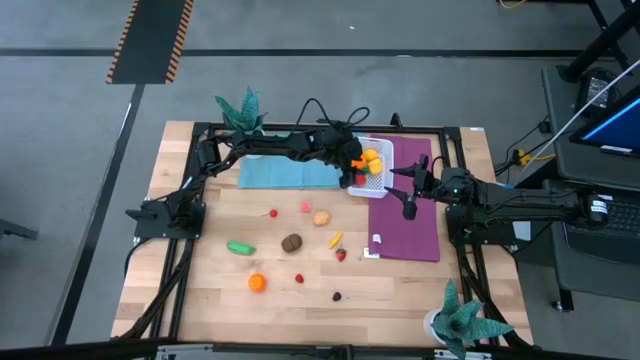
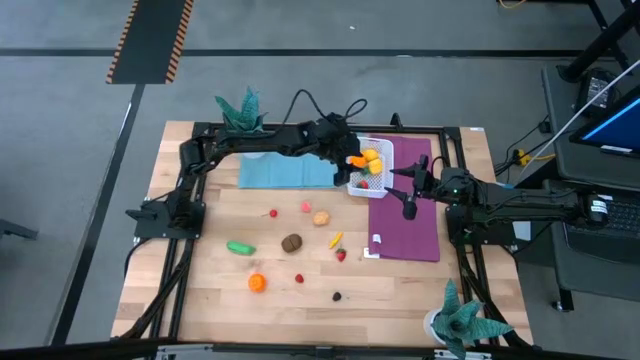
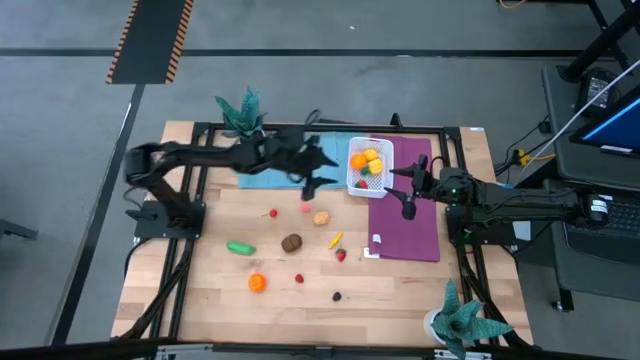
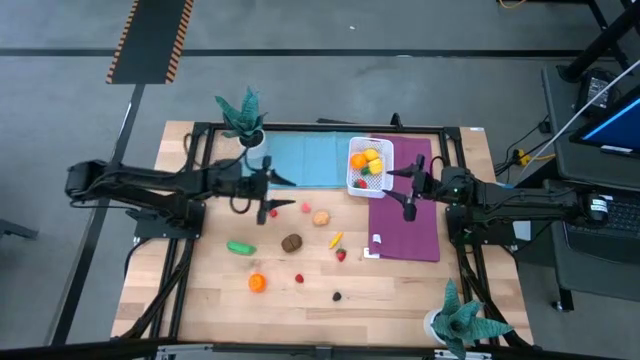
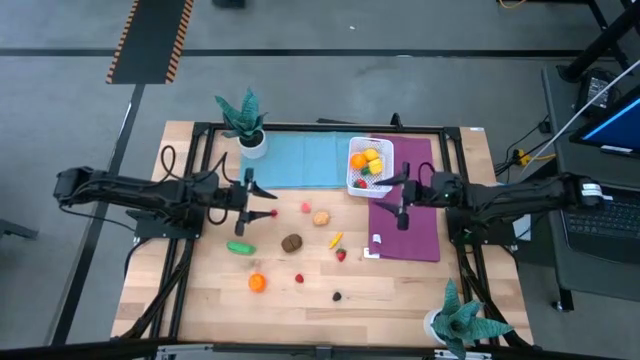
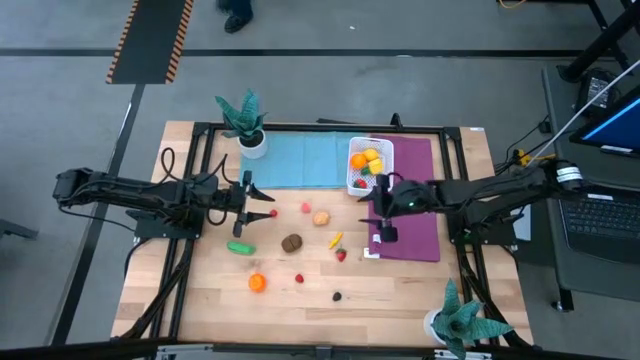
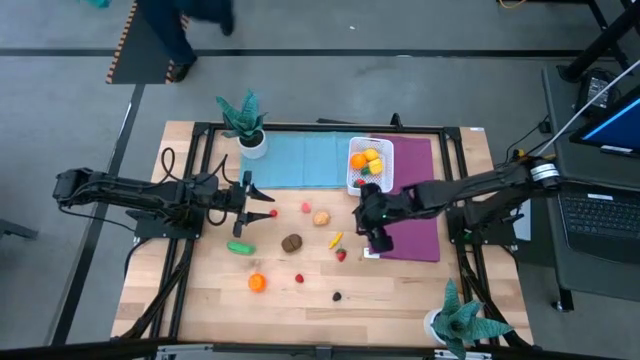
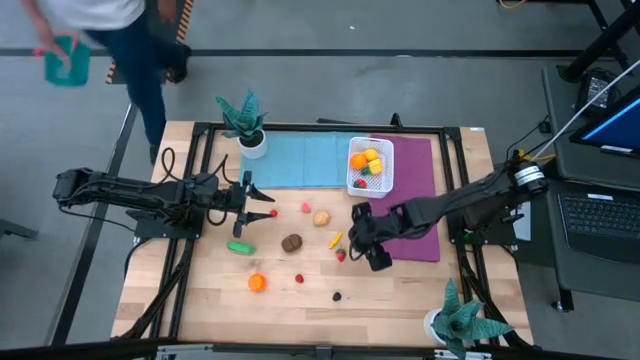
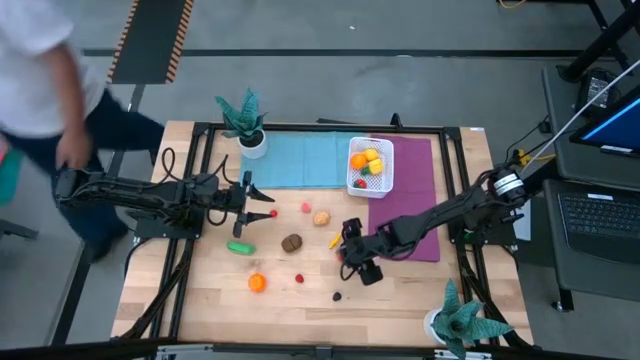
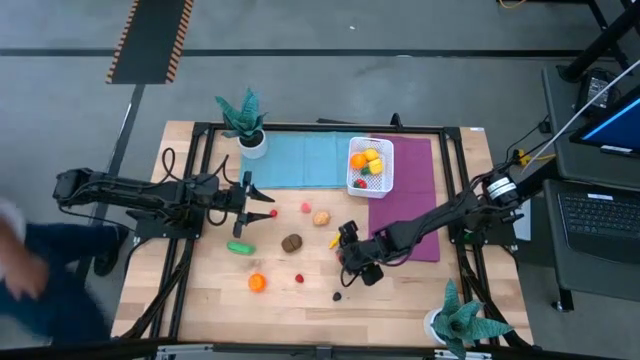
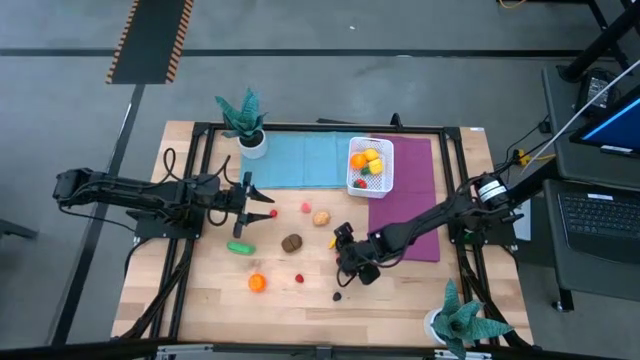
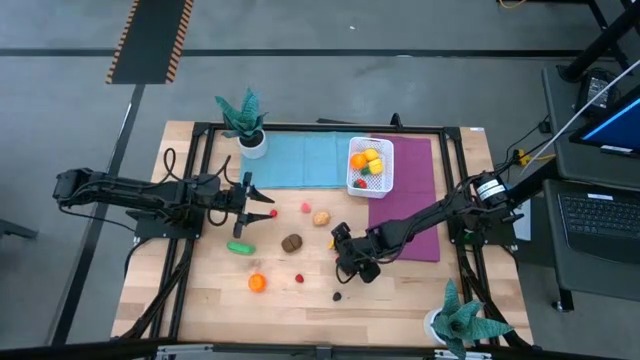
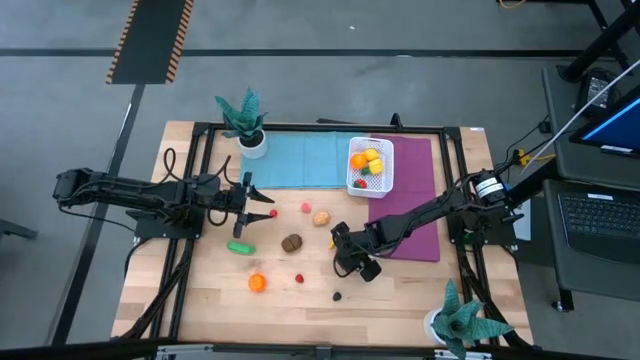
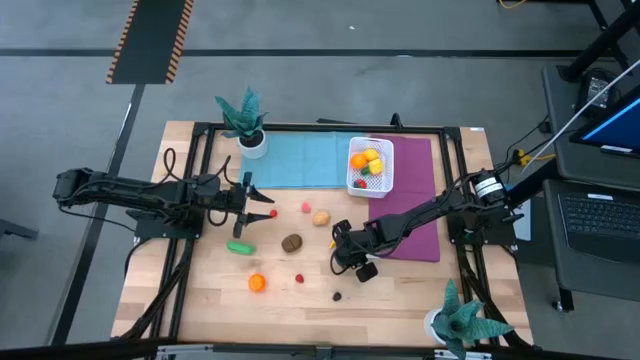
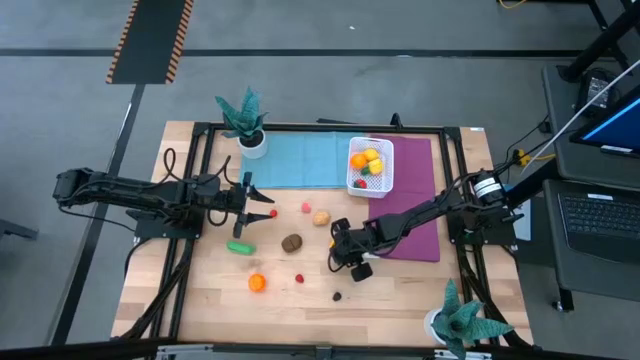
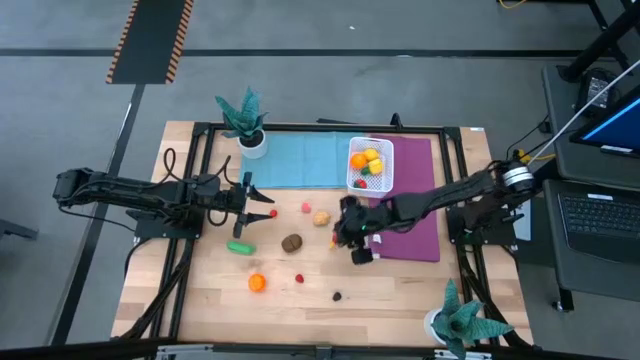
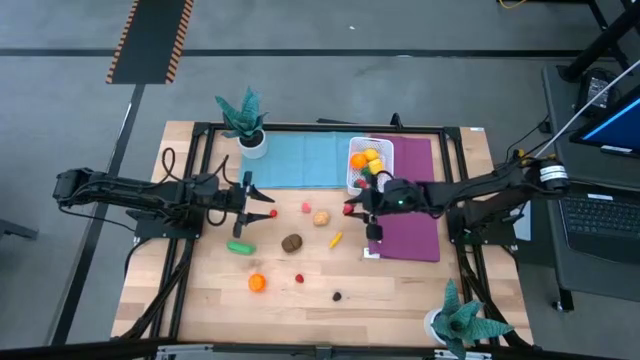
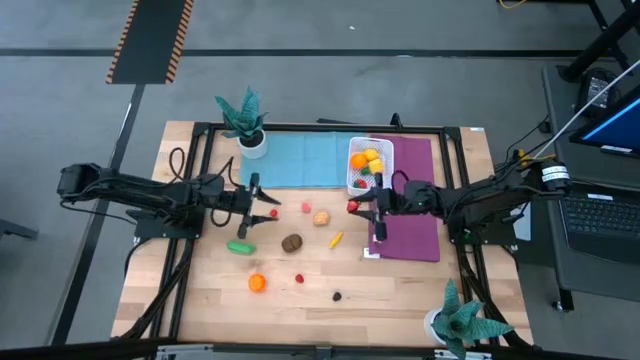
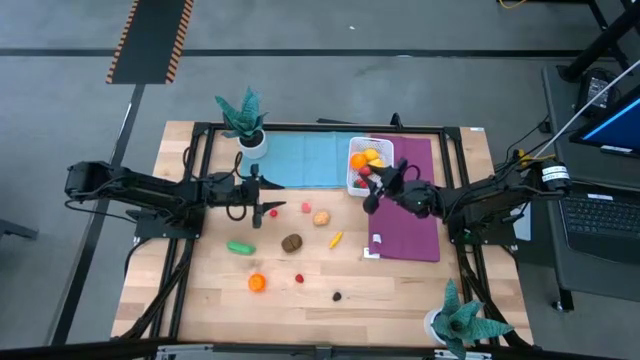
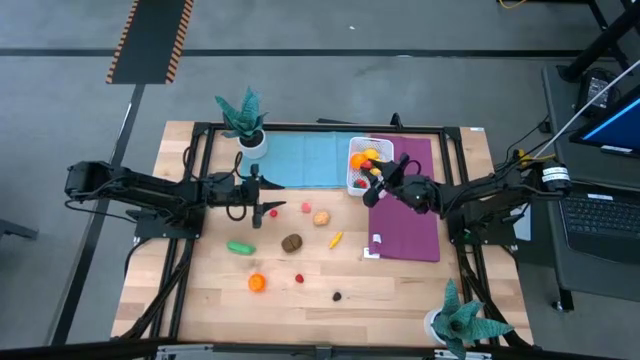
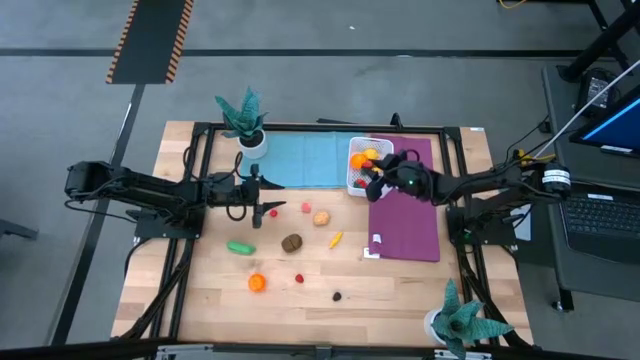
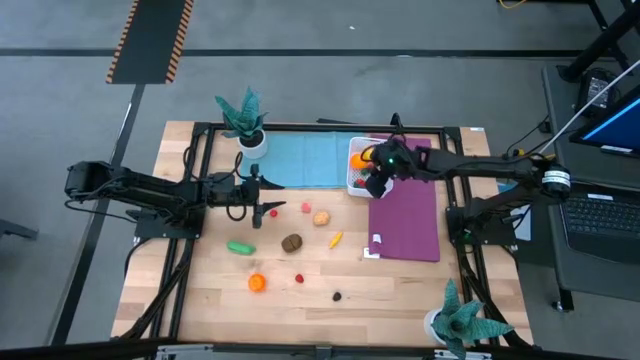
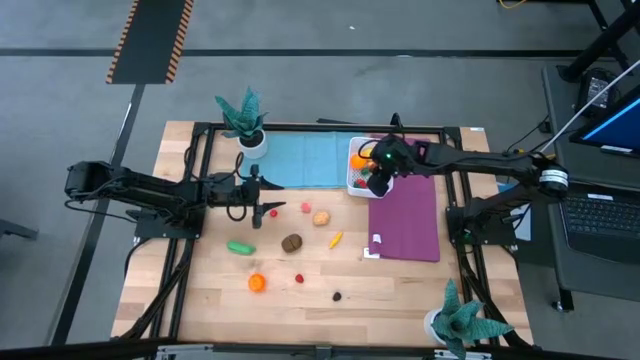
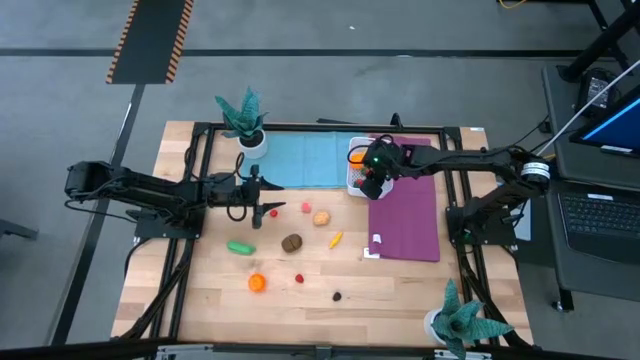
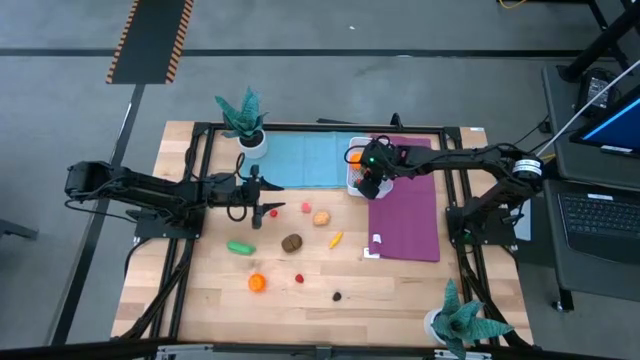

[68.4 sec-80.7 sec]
Task: Pick and placing Produce into tupperware
Put the red strawberry into the white container

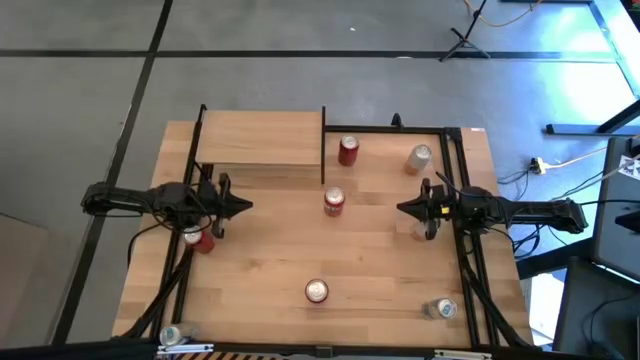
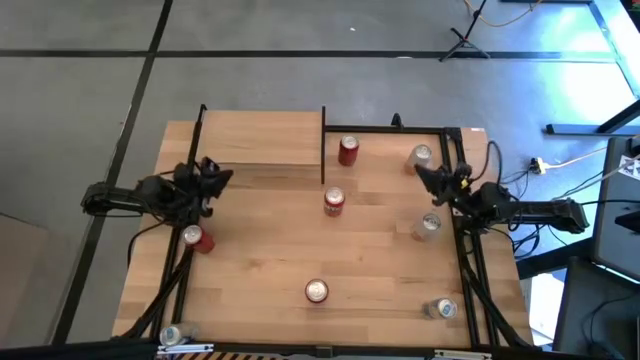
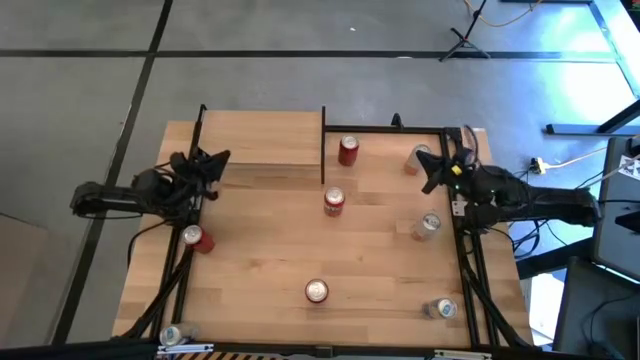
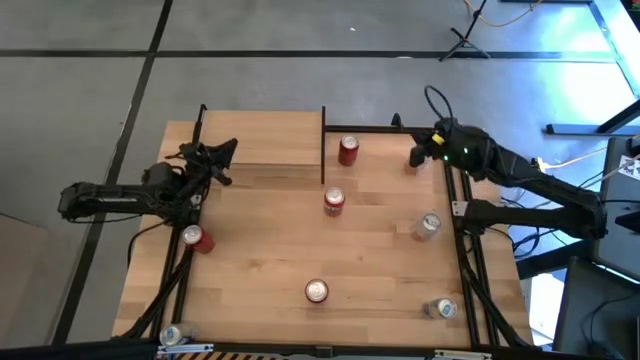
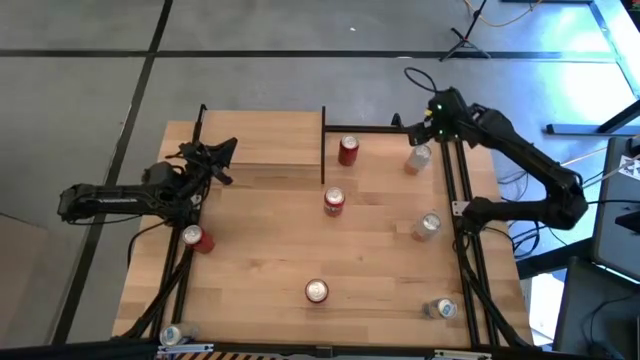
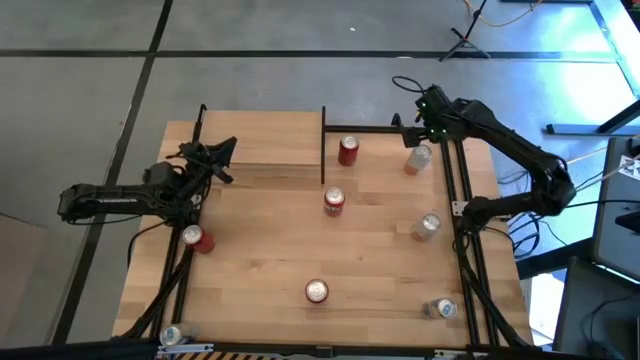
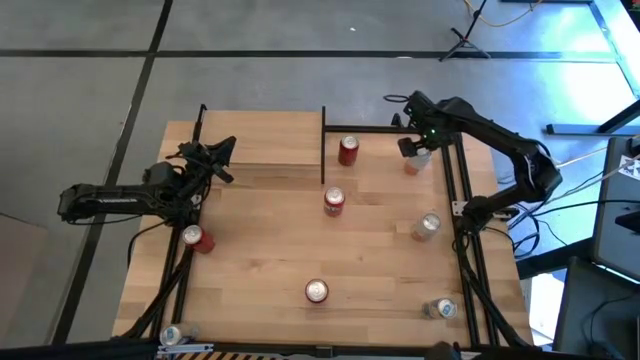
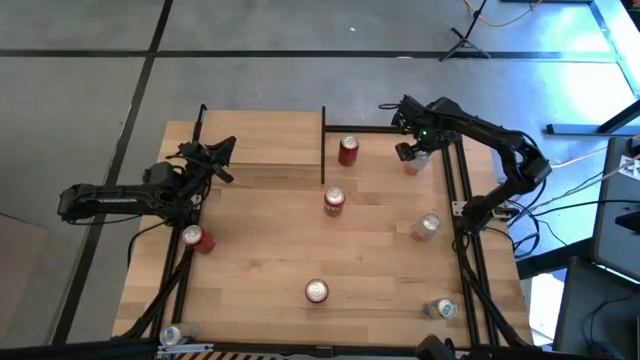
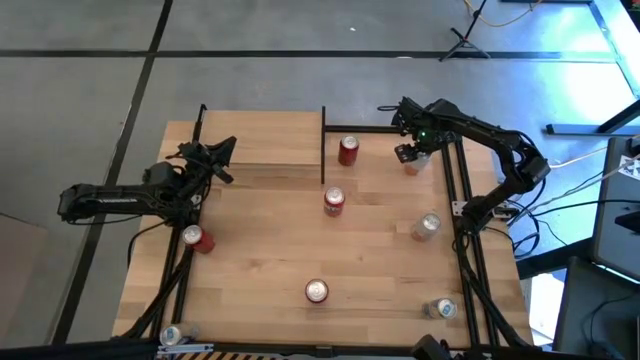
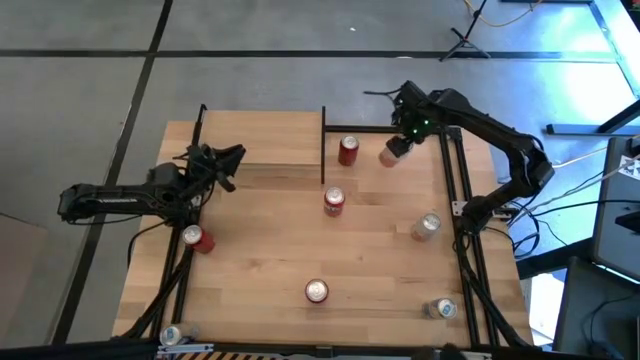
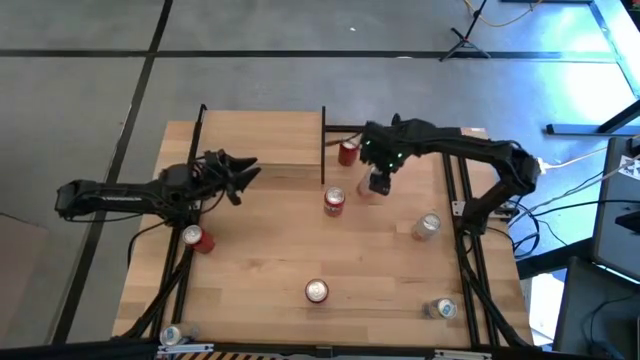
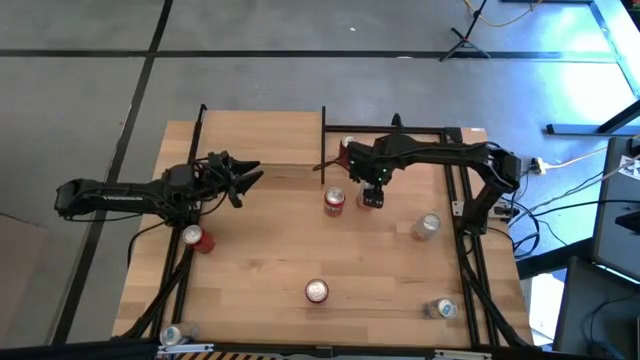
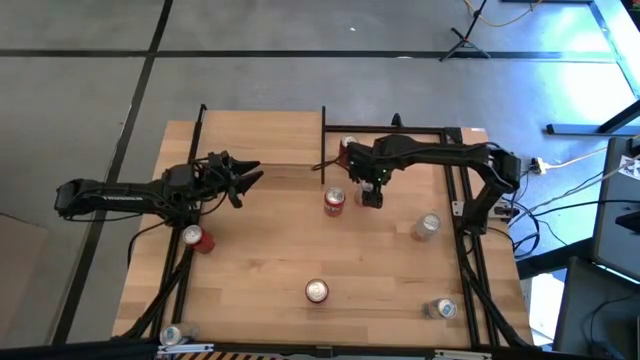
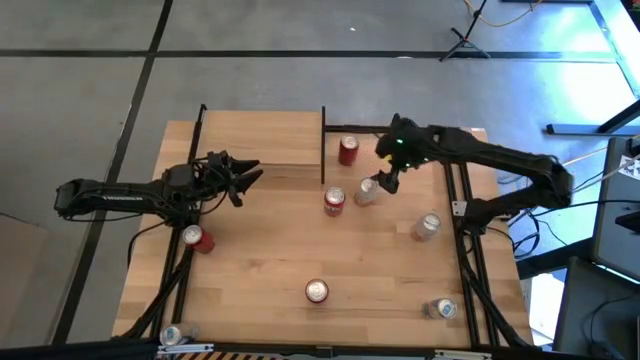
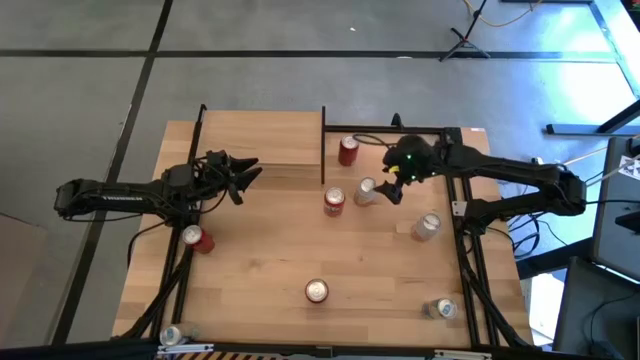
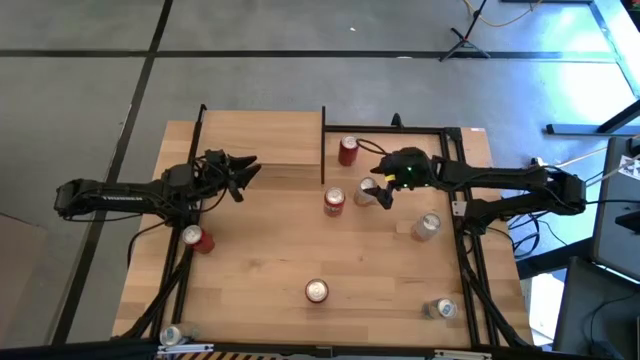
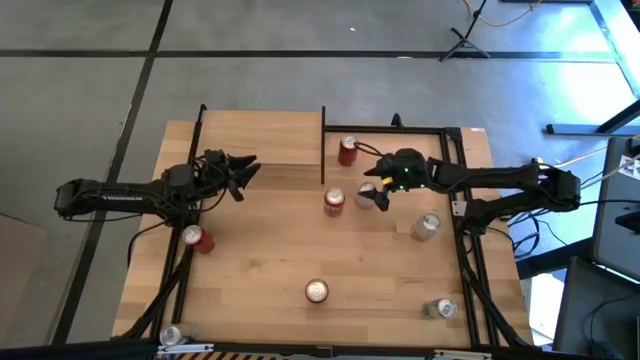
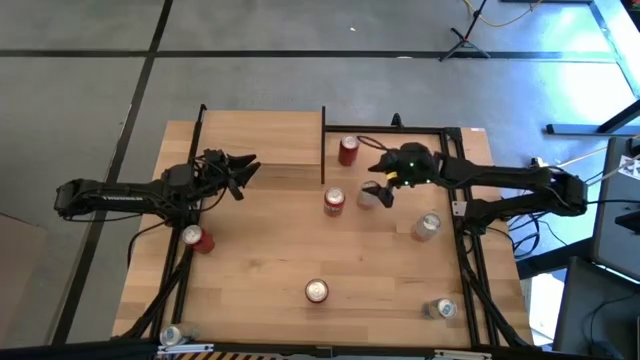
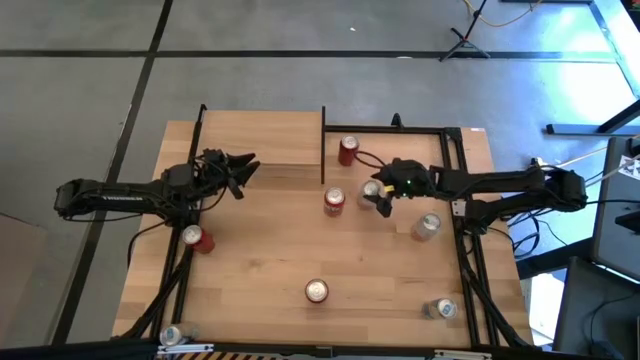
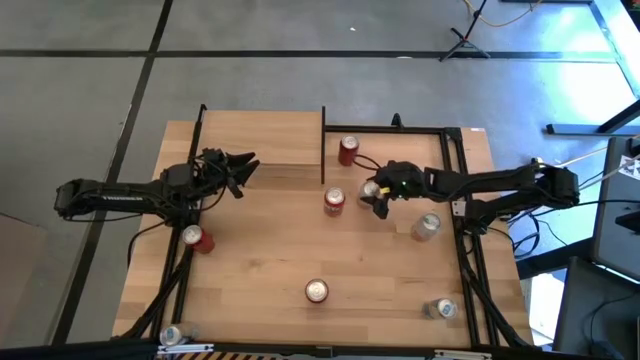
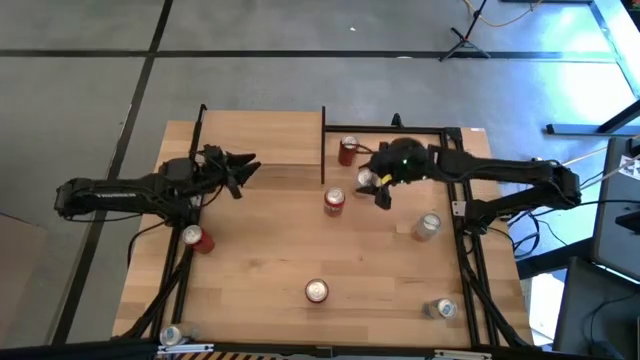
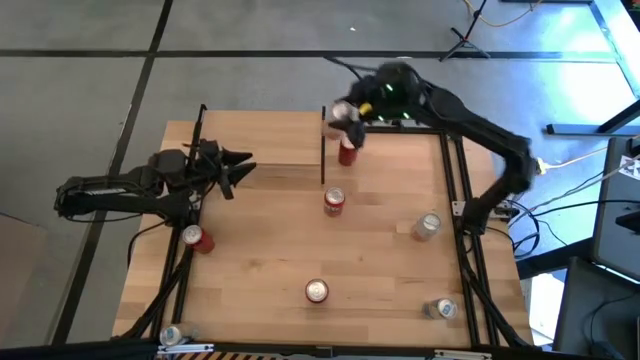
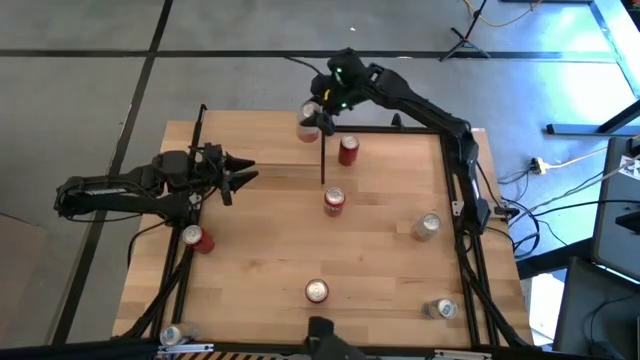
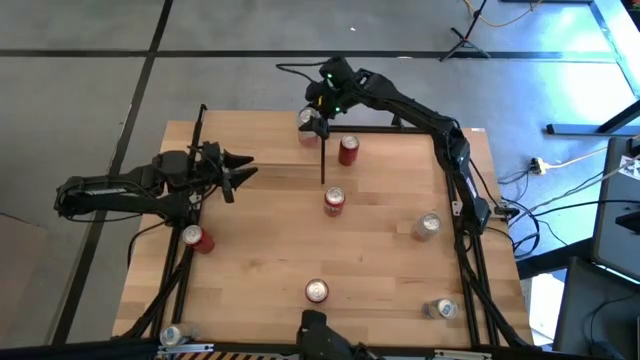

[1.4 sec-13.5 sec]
Task: Place canned beverage on shelf
Put the top white soda can on the shelf
